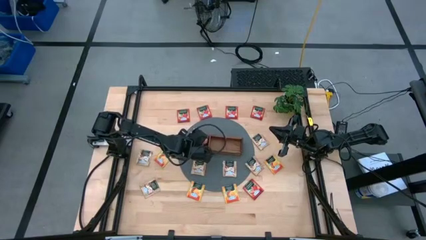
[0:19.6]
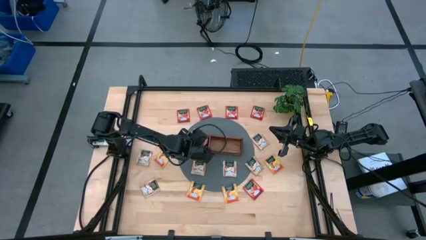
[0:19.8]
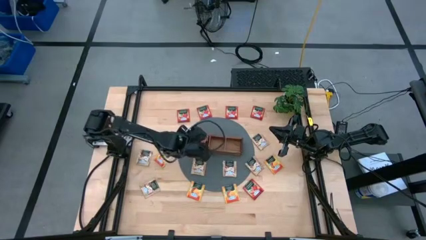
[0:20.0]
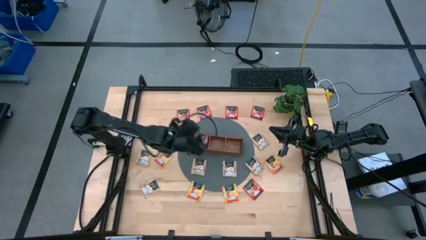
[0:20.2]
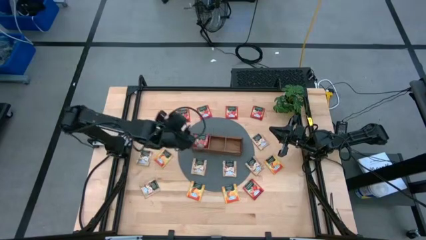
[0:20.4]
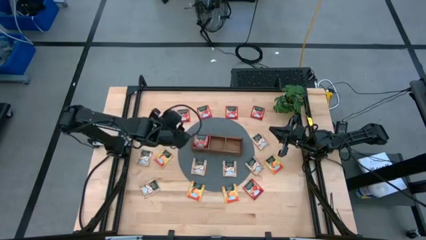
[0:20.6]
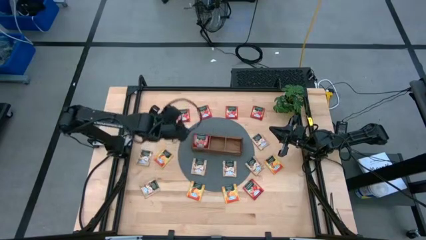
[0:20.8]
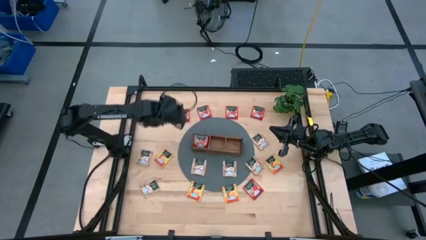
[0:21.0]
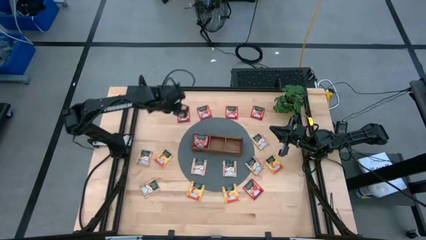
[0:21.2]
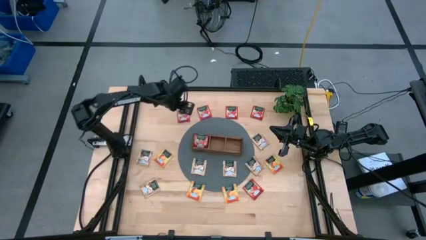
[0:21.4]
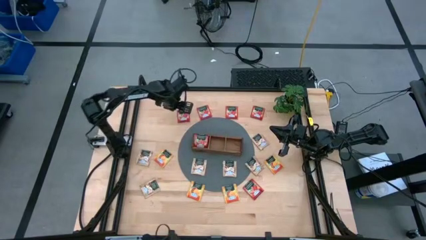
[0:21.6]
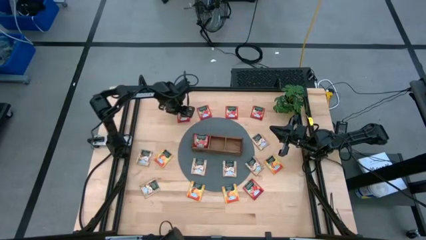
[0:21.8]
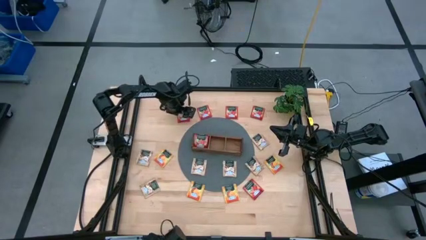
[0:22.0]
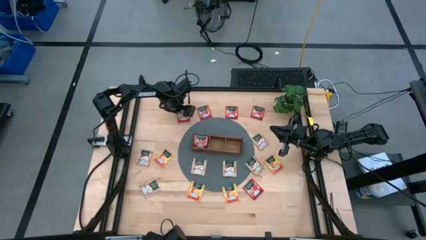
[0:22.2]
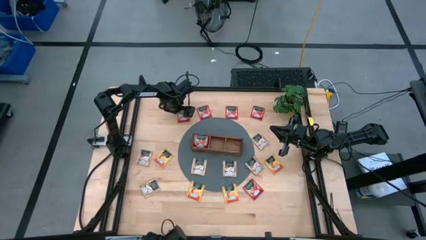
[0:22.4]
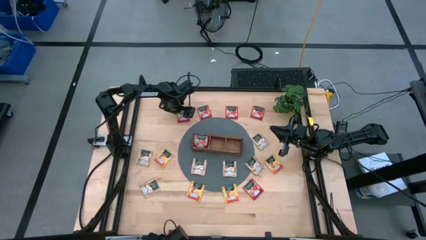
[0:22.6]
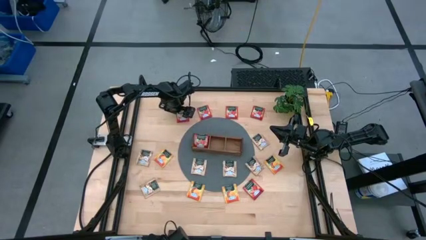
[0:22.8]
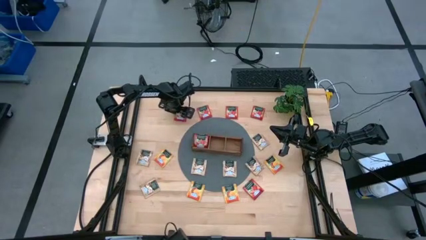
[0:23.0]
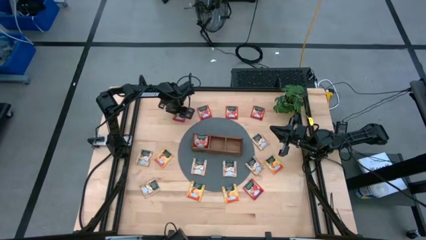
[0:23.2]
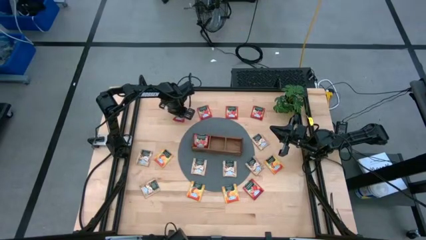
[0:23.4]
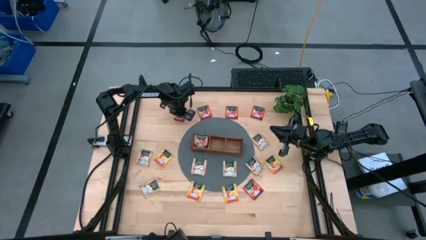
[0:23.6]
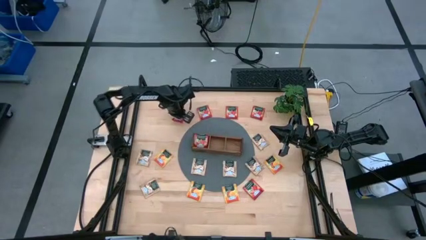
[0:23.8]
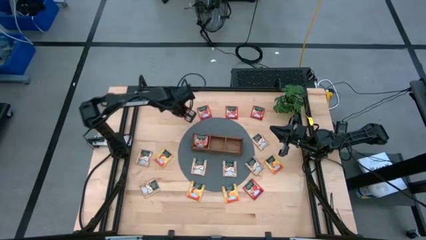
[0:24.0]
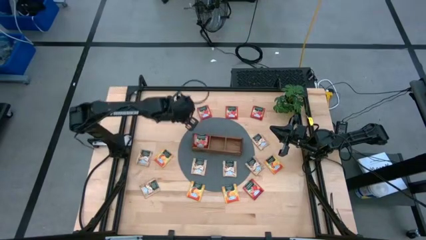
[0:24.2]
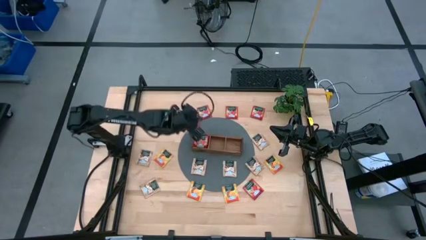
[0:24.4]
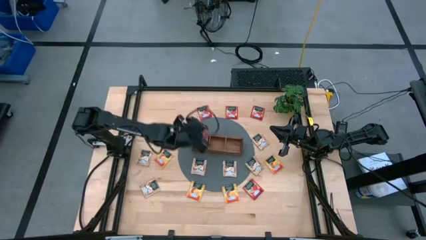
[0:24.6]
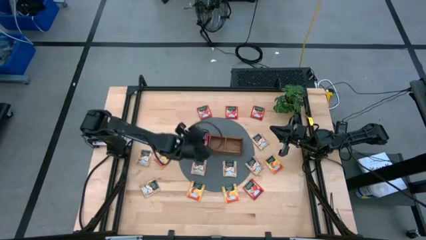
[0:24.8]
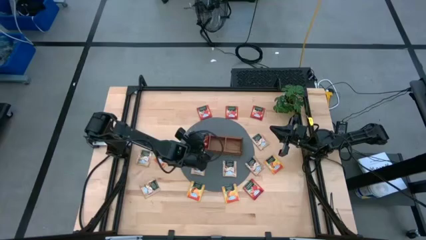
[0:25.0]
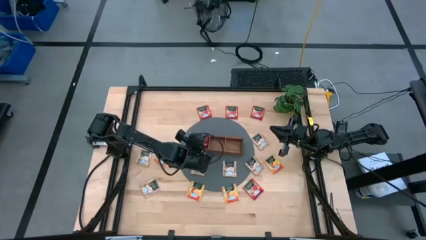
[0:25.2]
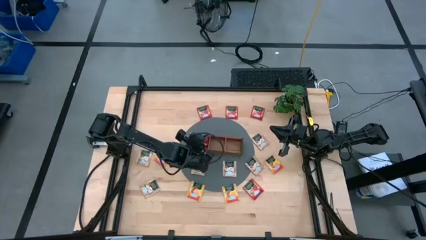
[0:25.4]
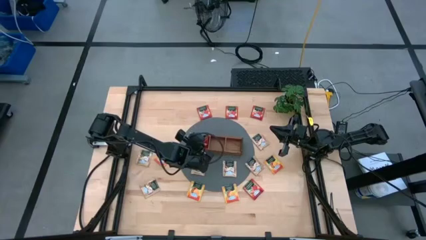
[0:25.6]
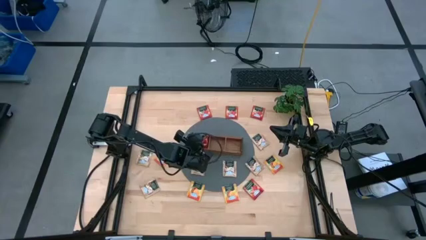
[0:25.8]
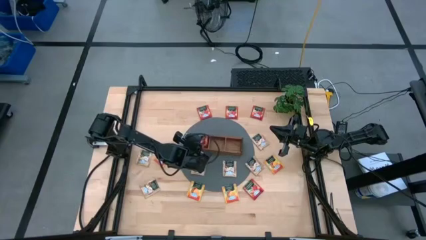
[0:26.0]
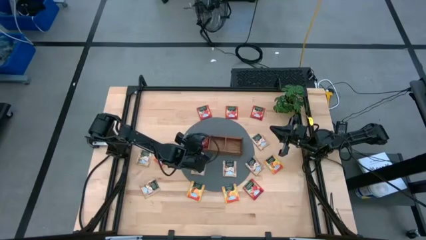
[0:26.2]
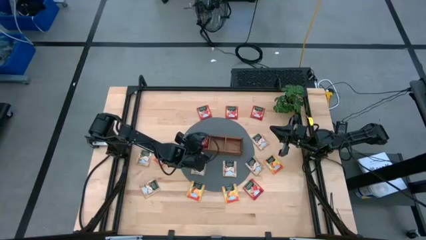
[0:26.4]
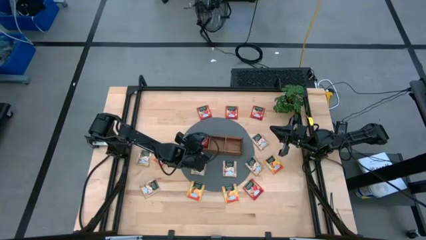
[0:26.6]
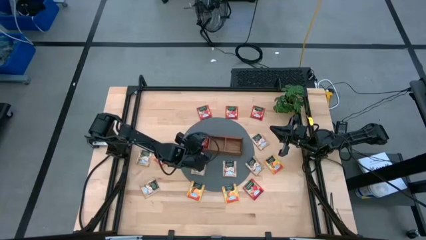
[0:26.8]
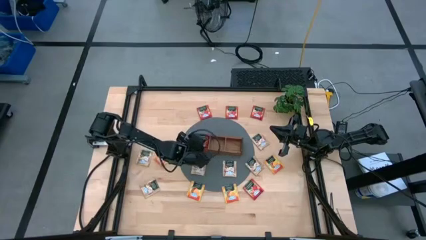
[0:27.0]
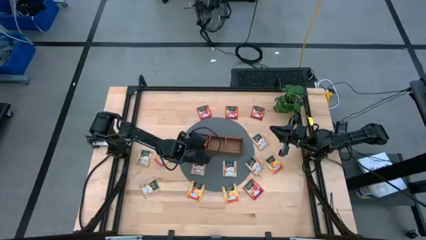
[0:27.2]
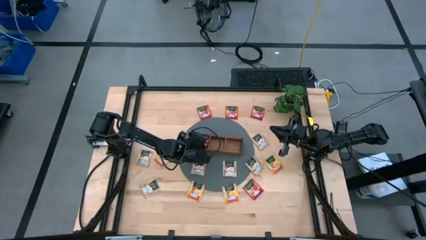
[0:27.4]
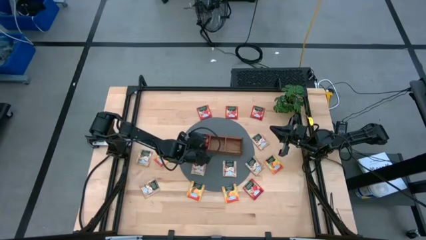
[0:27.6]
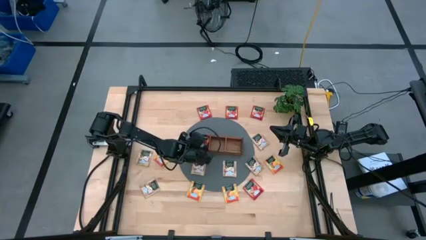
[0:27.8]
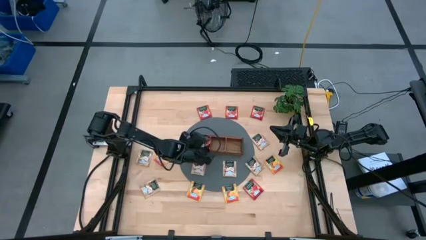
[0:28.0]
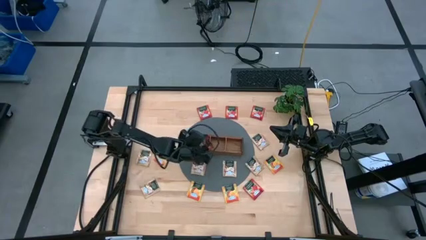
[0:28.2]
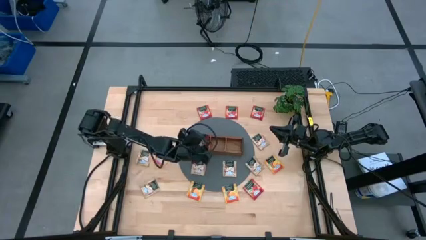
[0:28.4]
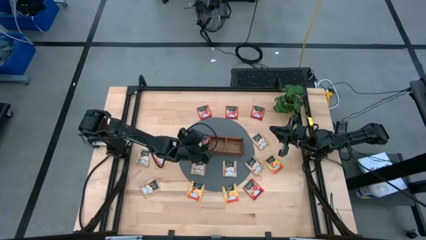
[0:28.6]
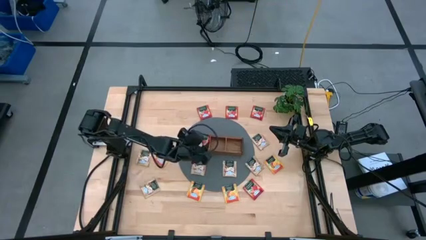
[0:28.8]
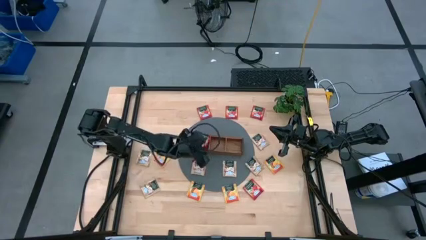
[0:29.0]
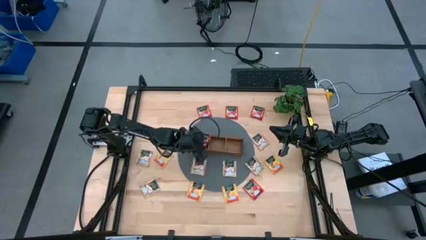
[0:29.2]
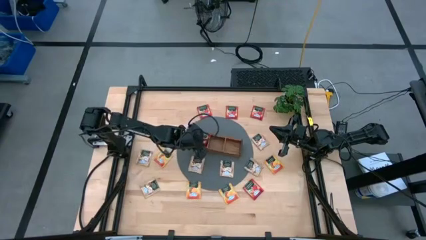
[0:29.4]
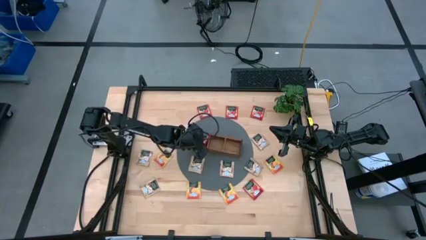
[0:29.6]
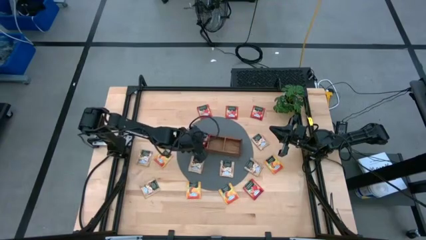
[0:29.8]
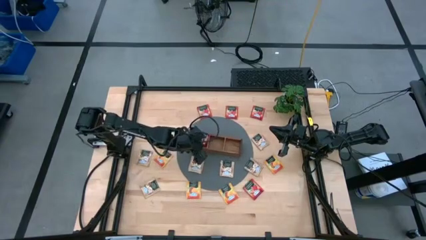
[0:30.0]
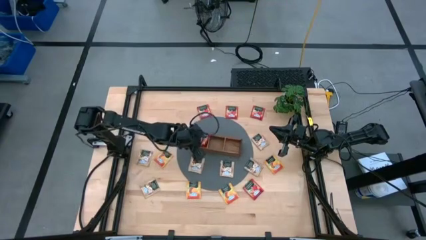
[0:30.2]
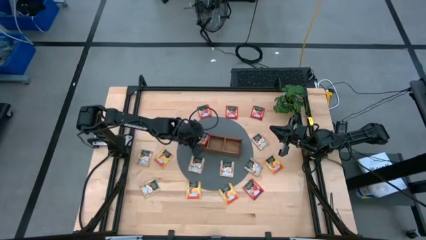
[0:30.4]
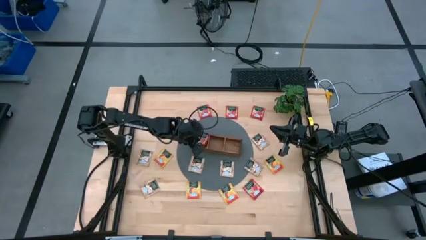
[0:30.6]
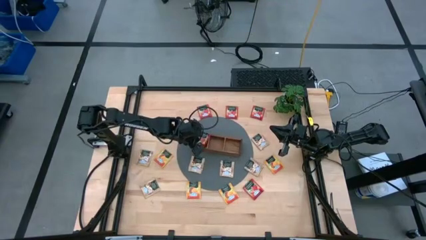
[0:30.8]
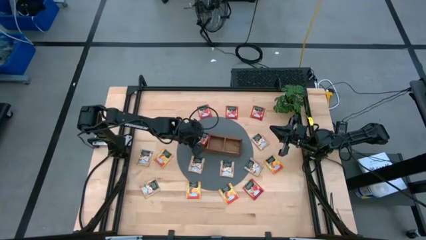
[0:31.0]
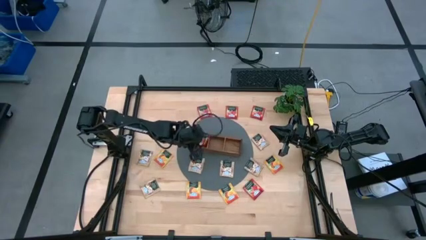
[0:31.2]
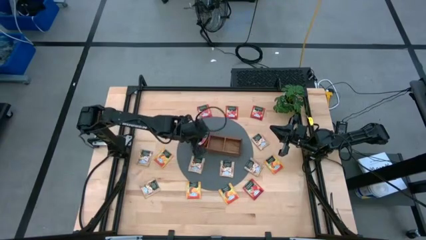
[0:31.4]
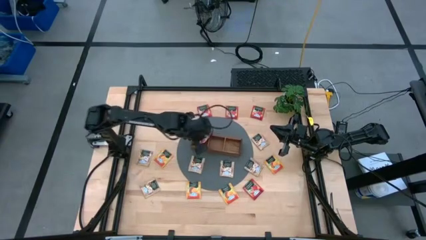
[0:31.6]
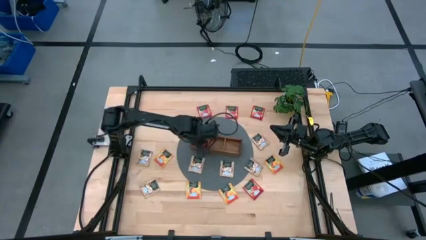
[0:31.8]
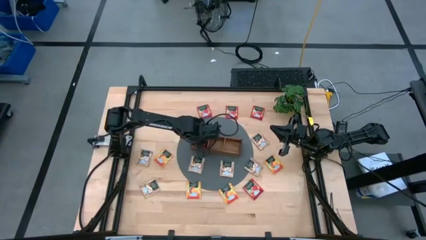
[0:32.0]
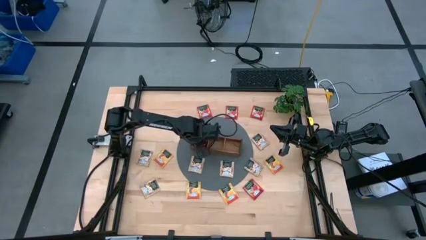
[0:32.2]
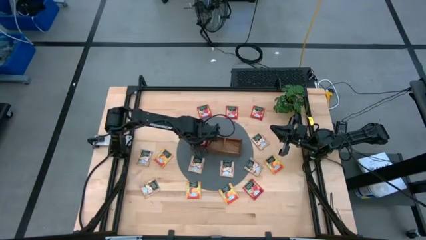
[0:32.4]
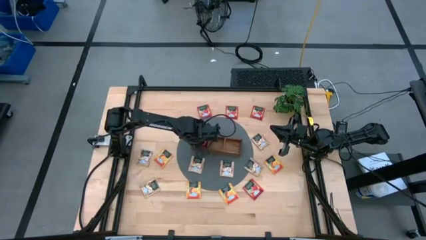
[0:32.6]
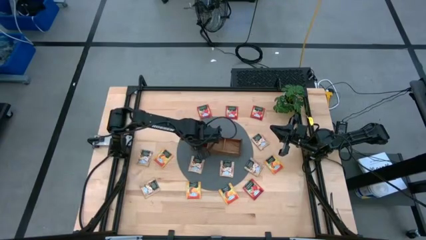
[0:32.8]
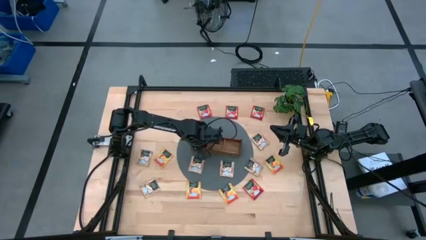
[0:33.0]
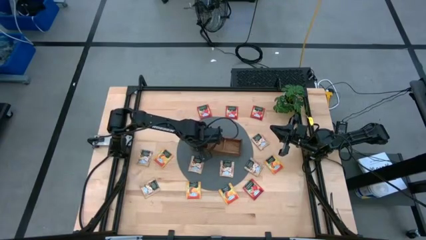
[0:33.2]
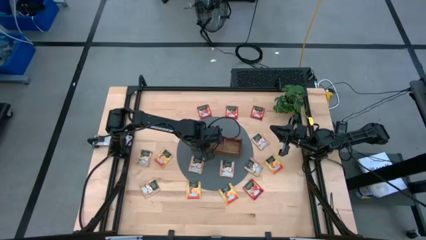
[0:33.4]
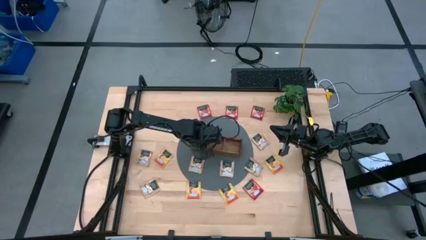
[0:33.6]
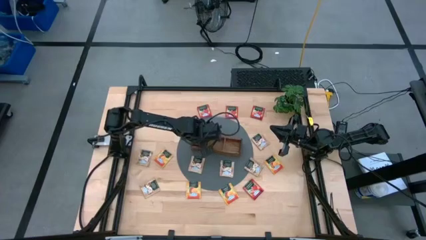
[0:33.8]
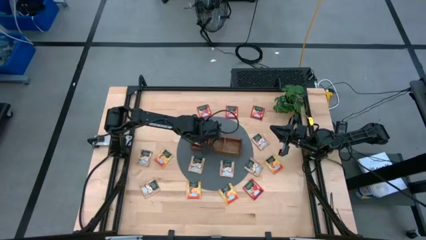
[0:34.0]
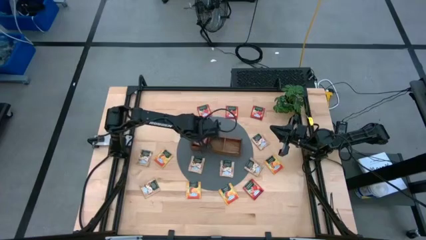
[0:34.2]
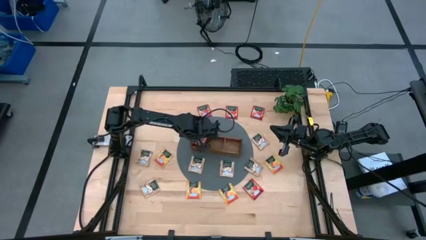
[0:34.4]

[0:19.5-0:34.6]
Task: Pick & Place Tea
Put the red tea bag into the left section of the wooden organizer

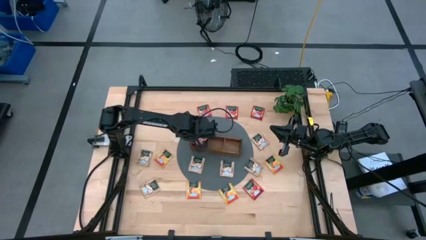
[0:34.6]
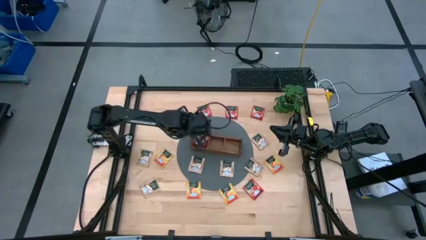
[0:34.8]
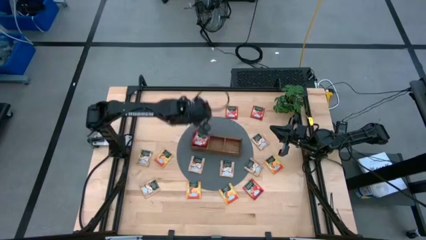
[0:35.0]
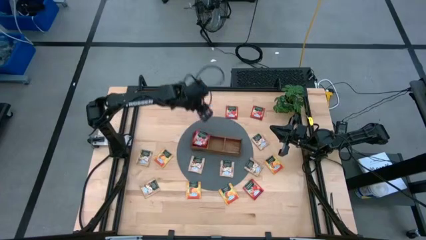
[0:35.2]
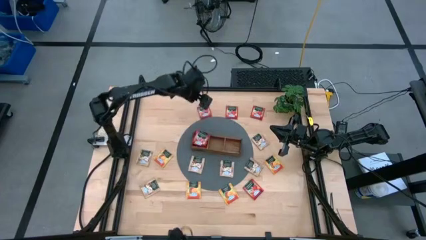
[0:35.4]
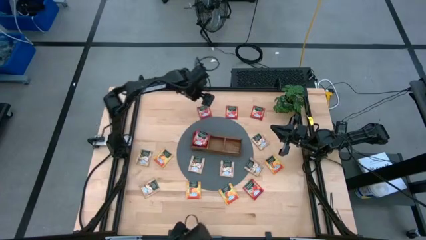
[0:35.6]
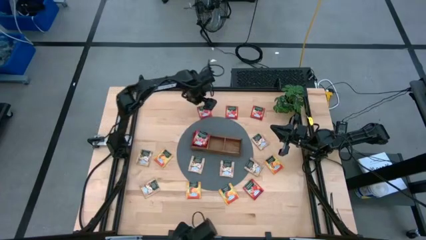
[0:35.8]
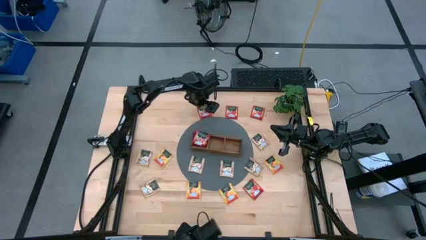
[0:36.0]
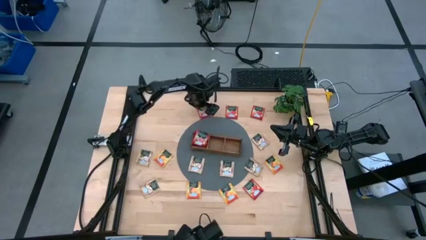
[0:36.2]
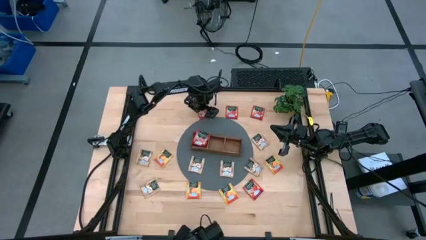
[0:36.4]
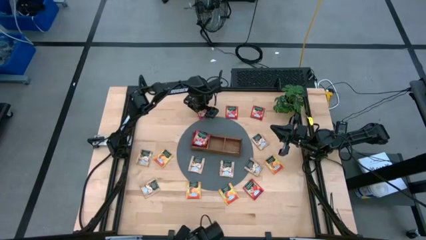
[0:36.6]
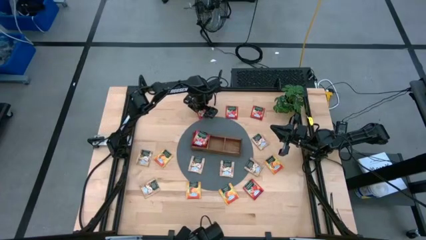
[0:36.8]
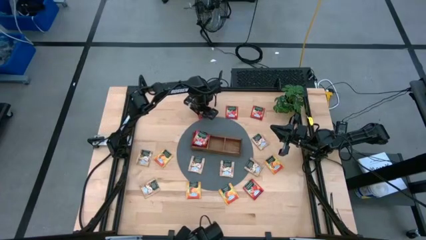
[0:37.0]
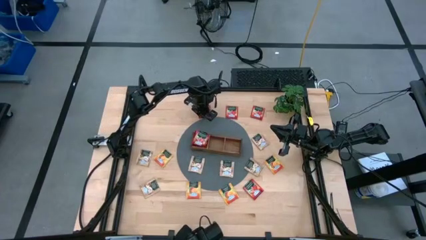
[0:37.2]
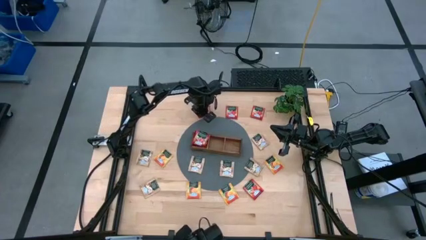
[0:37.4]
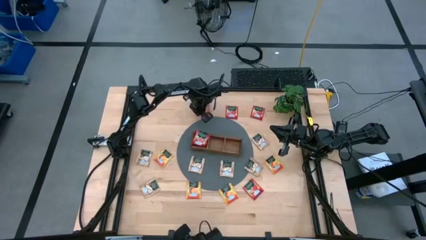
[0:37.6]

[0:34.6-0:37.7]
Put the red tea bag into the left section of the wooden organizer
